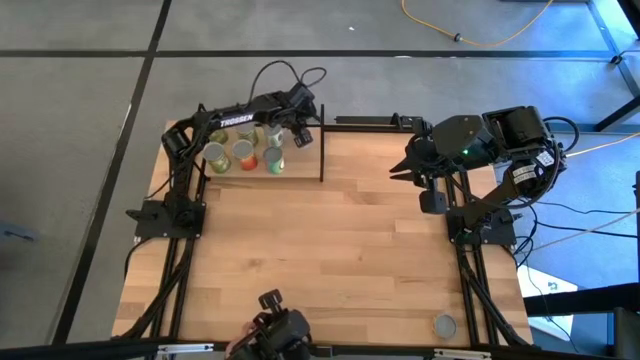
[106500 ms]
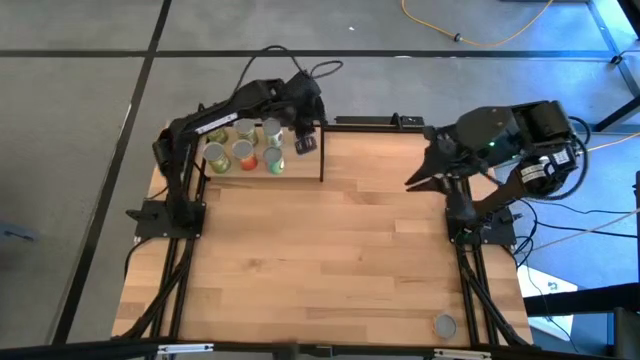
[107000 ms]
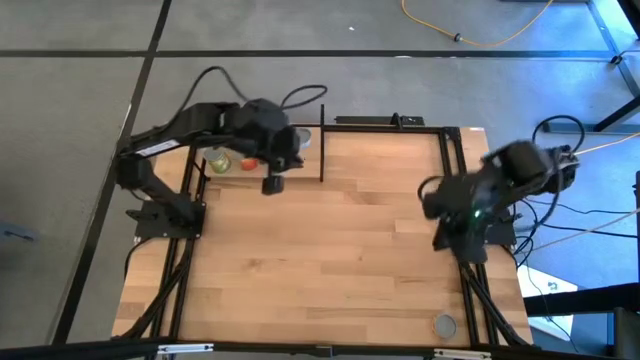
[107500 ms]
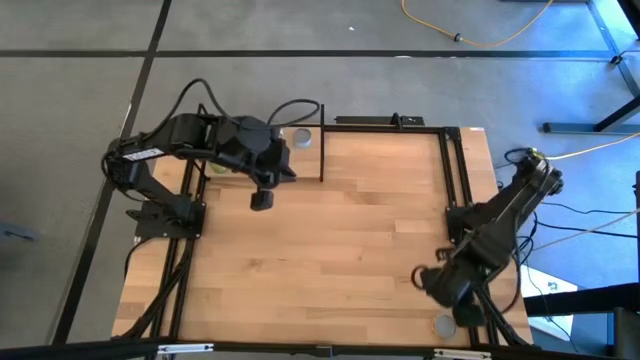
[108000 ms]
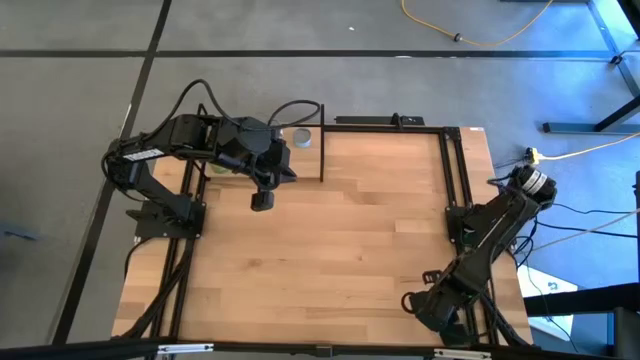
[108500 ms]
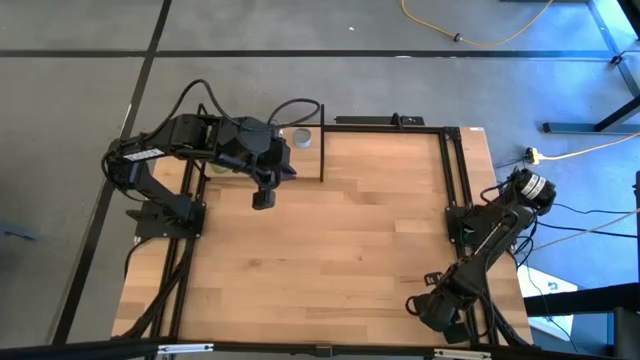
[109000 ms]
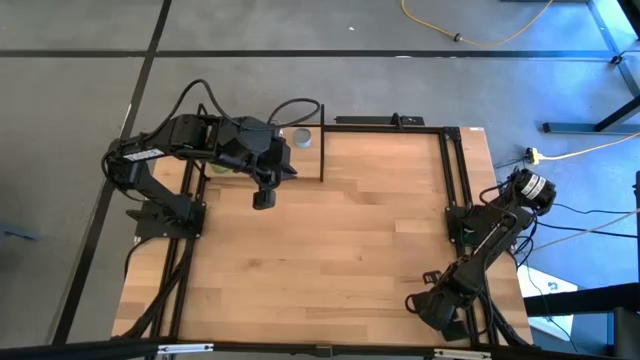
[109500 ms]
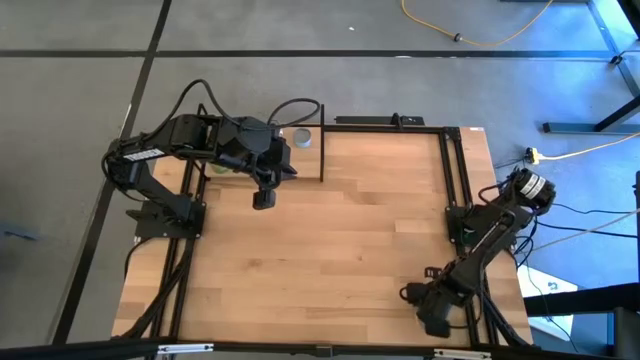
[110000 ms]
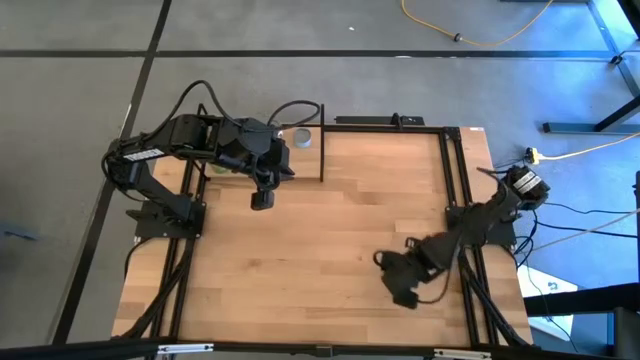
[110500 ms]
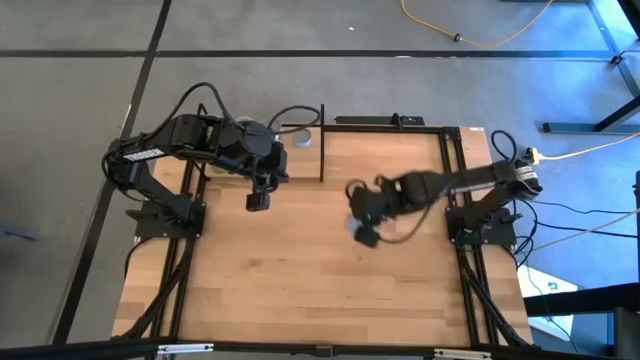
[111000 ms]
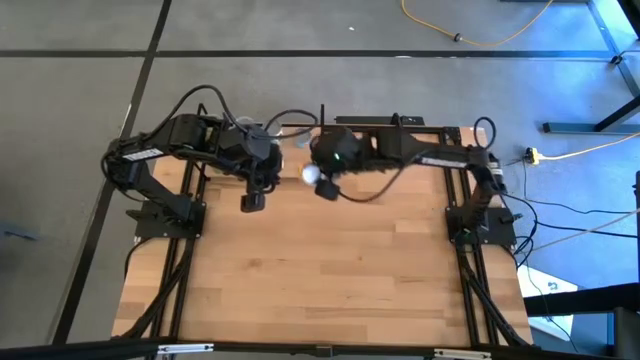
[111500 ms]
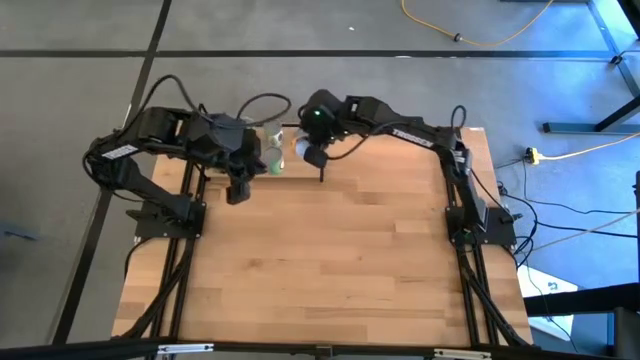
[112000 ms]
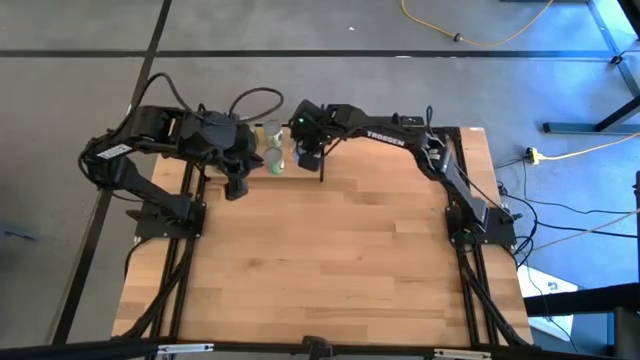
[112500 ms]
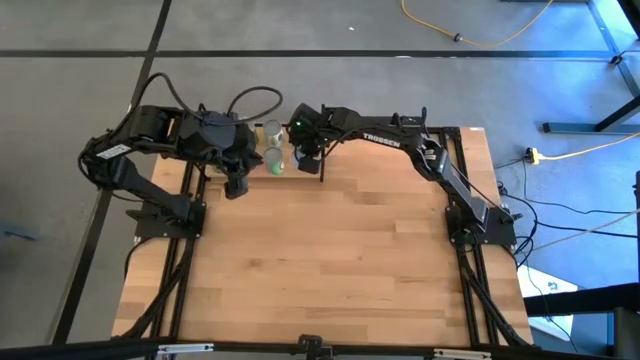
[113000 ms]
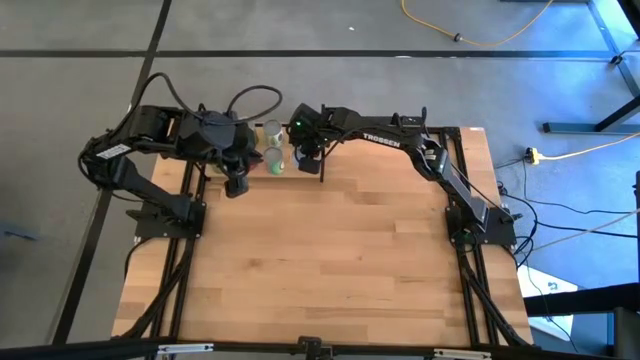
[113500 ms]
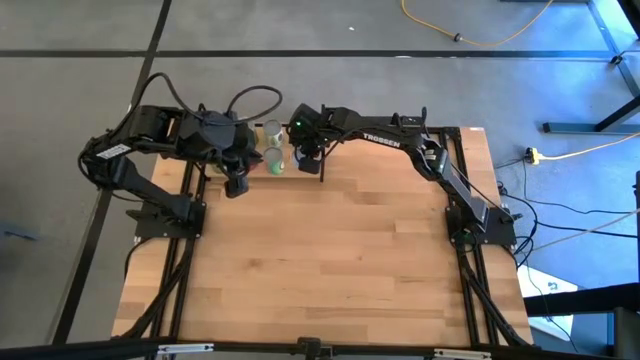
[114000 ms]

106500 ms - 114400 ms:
Task: Pick and place cans onto a shelf
Put the canned pineapple rings on the shelf

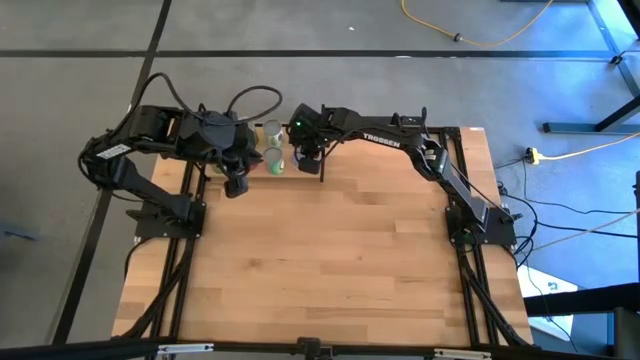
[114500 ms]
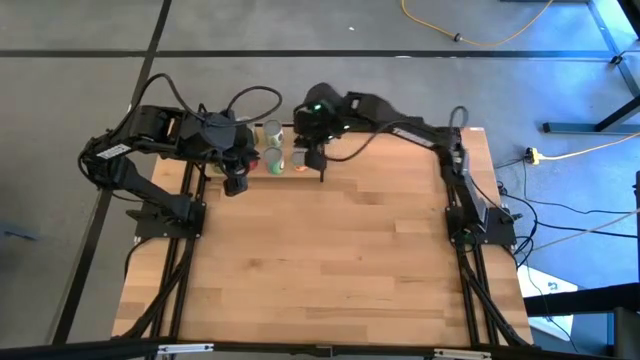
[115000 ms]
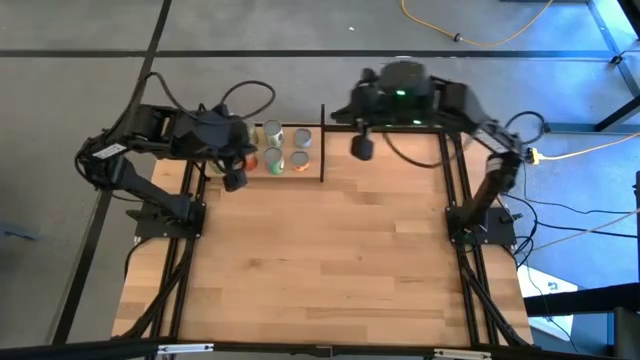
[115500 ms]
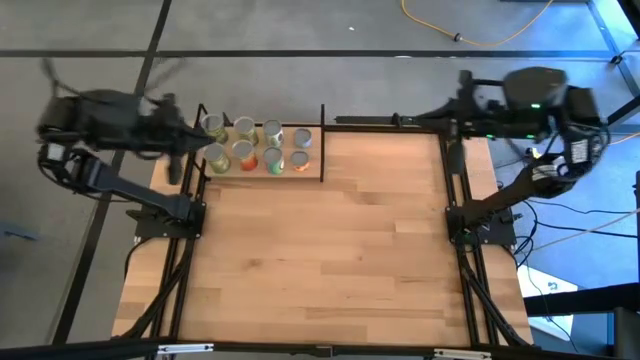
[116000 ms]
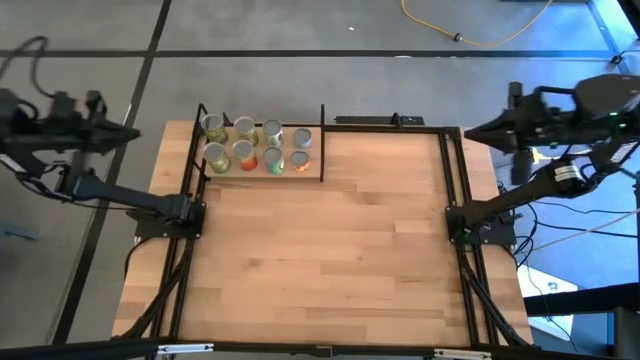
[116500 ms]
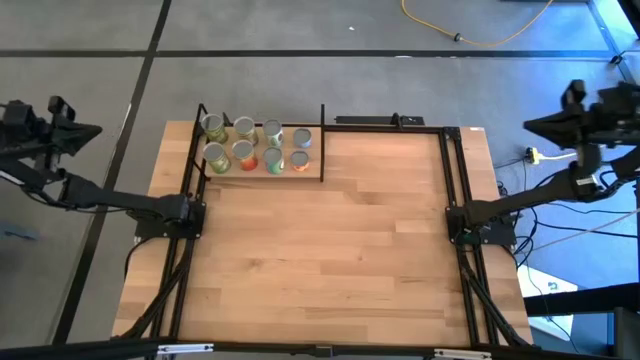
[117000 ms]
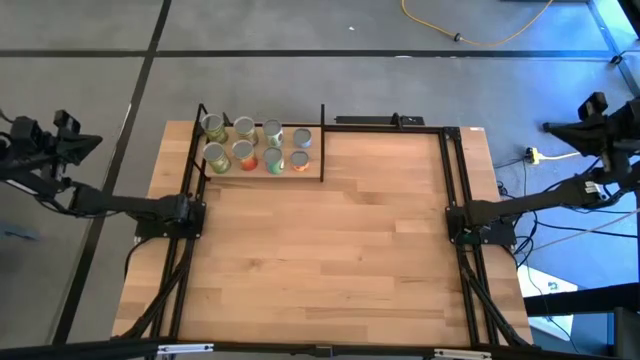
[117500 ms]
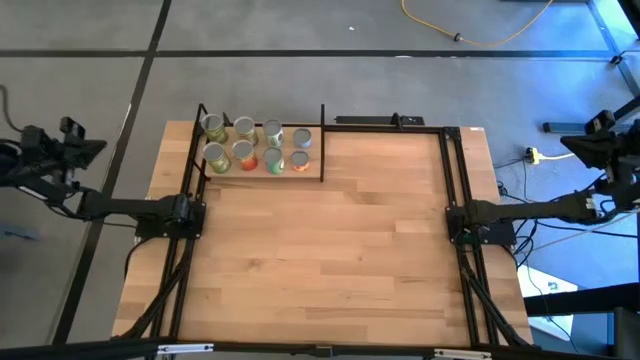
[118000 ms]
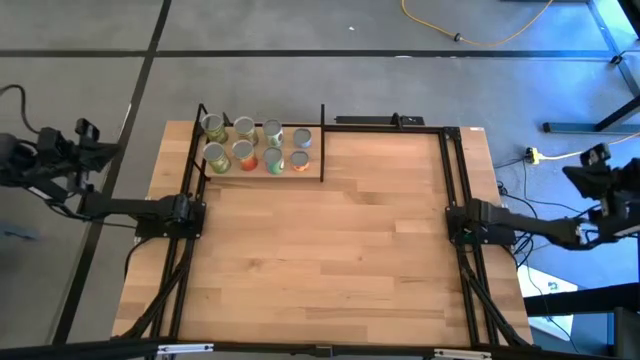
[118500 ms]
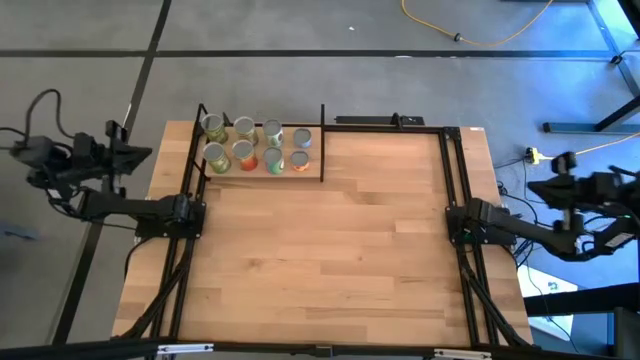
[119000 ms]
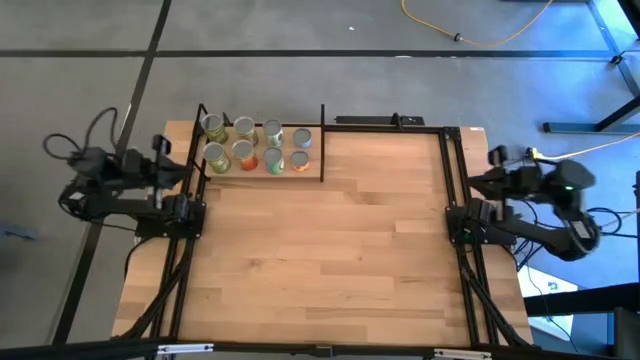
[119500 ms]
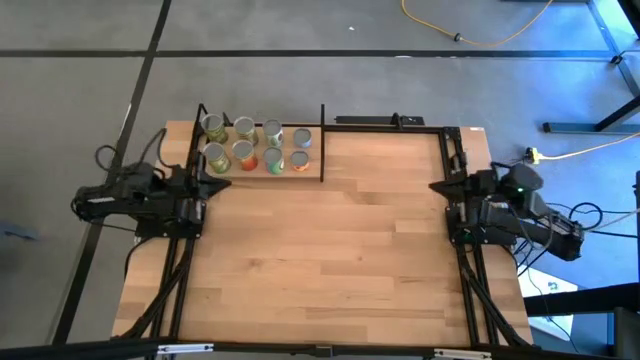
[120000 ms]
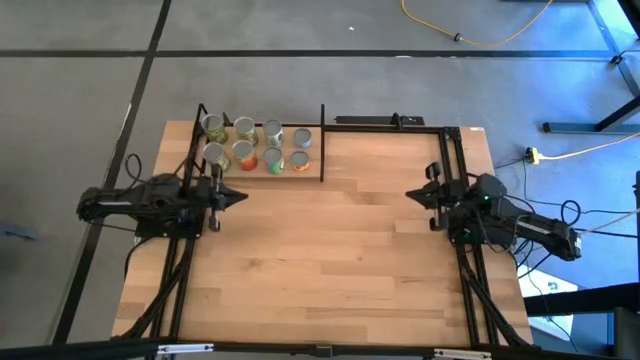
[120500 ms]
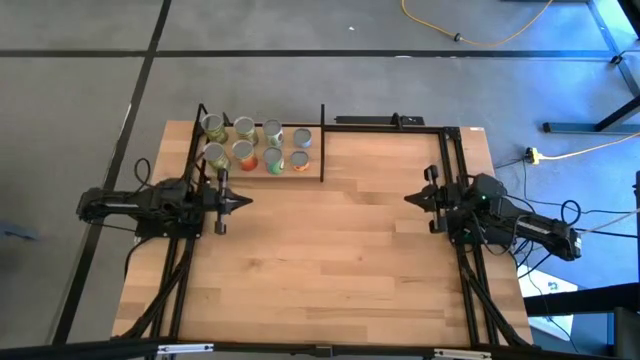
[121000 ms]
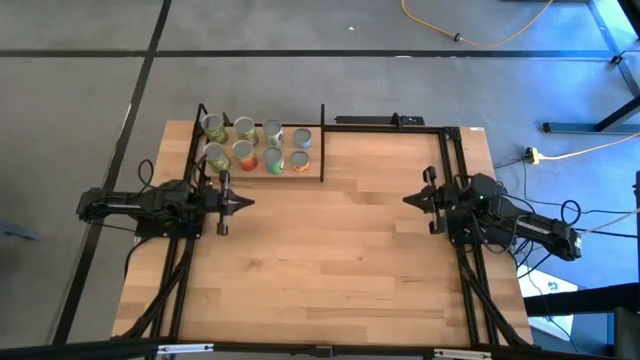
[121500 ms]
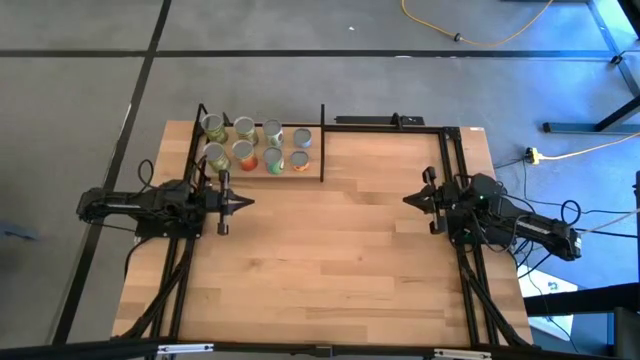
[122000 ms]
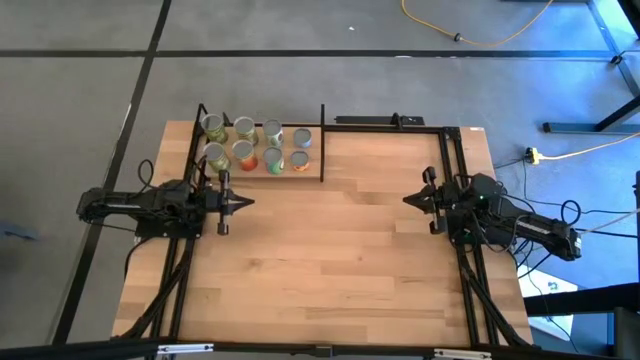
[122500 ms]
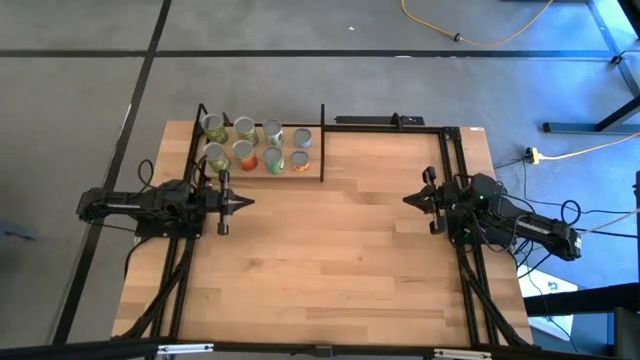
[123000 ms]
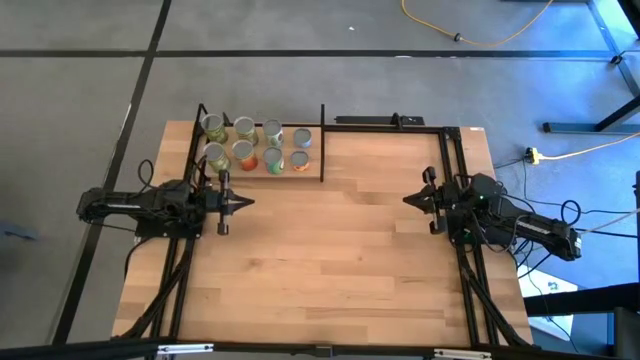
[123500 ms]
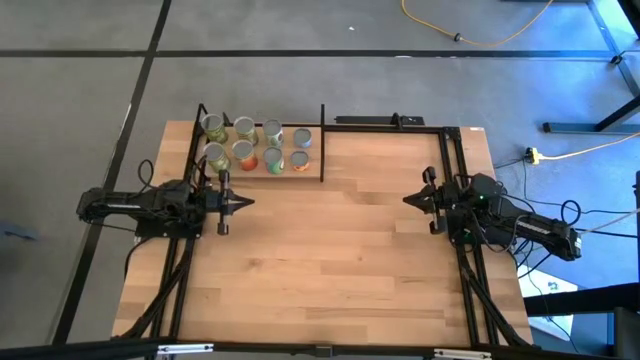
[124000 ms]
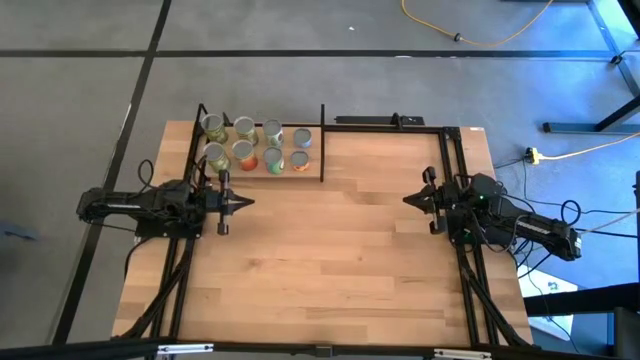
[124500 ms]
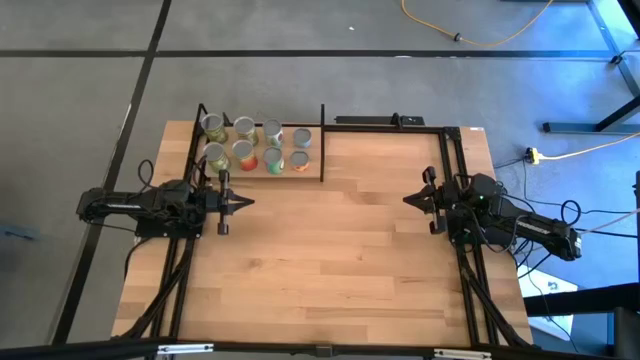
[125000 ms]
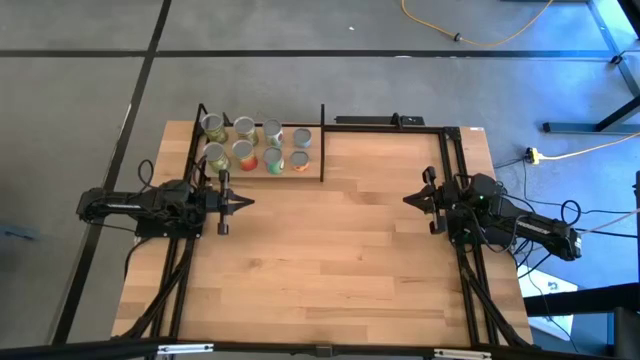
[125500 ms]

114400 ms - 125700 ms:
Return to Home Position

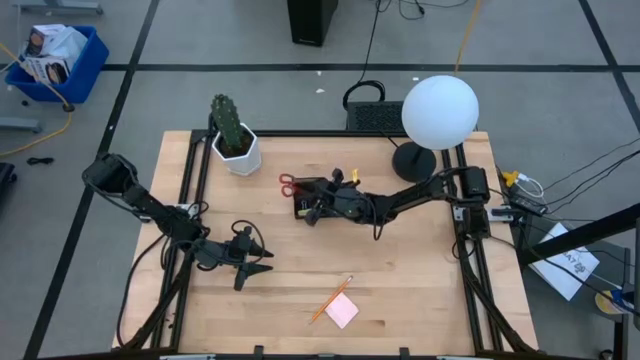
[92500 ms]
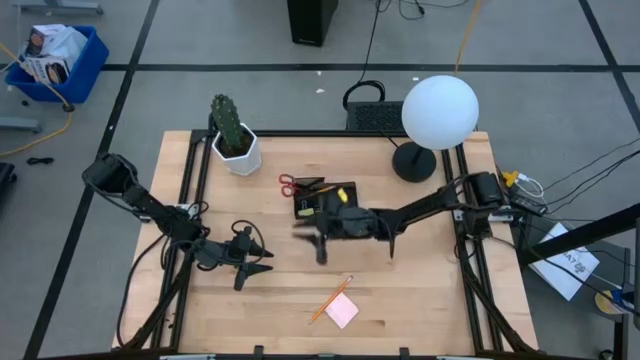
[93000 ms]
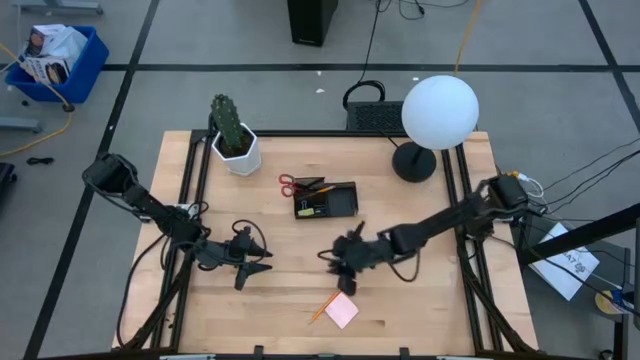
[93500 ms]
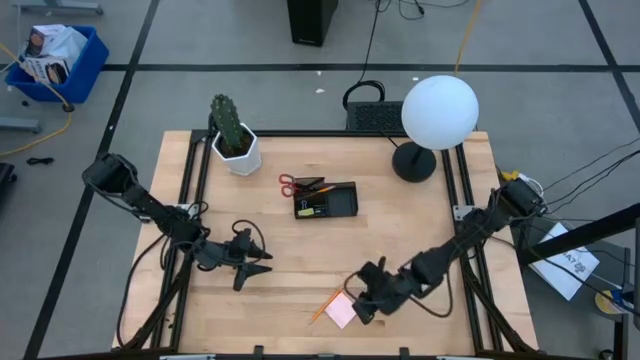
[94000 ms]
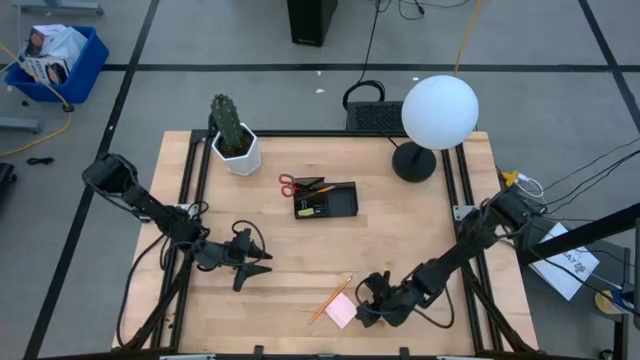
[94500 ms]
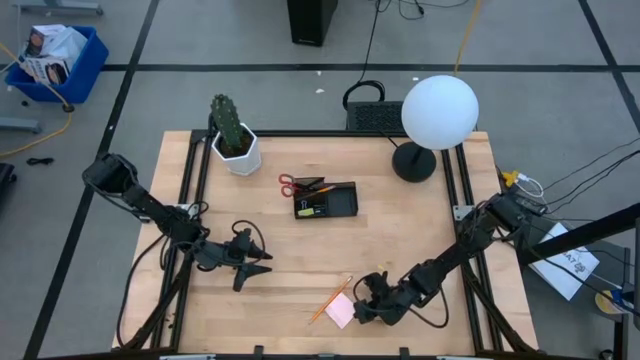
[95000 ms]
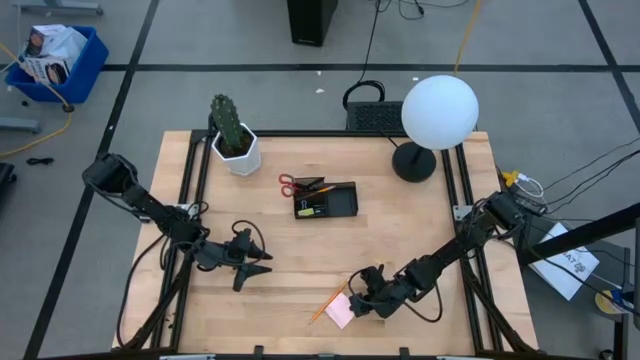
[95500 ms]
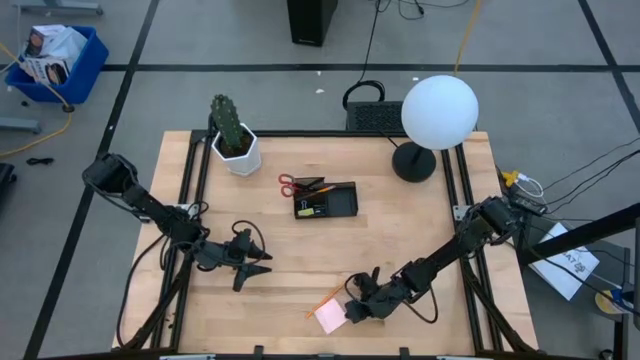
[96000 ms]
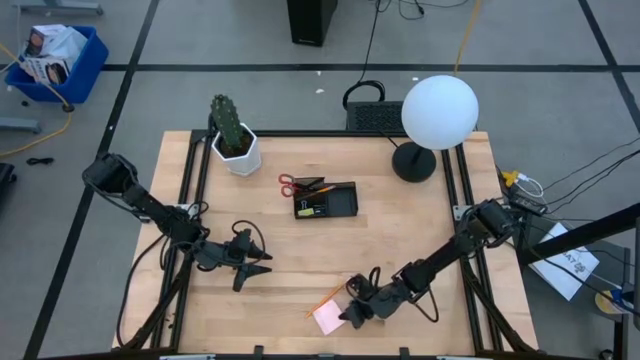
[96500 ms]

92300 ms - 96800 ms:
Task: Pick and place office supplies into organizer
Put the pink sticky notes into the right of the desk organizer
